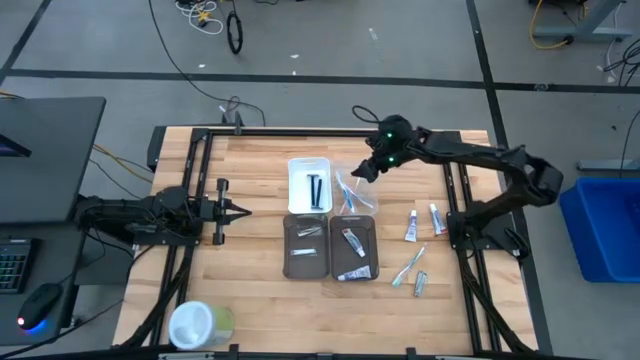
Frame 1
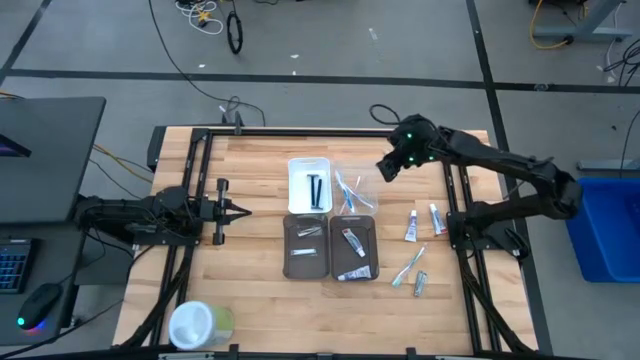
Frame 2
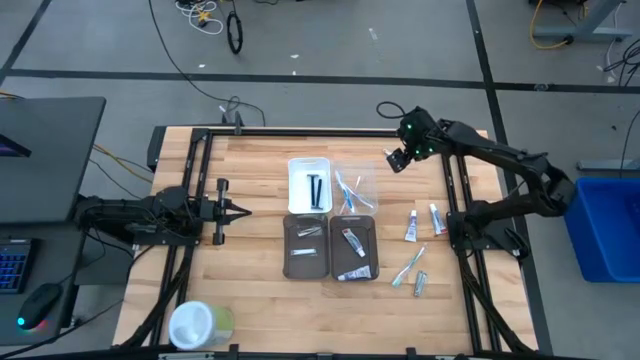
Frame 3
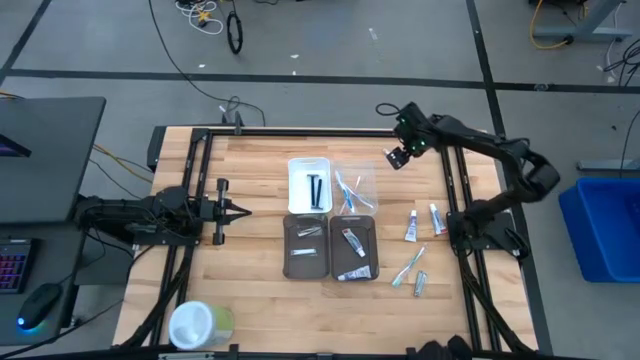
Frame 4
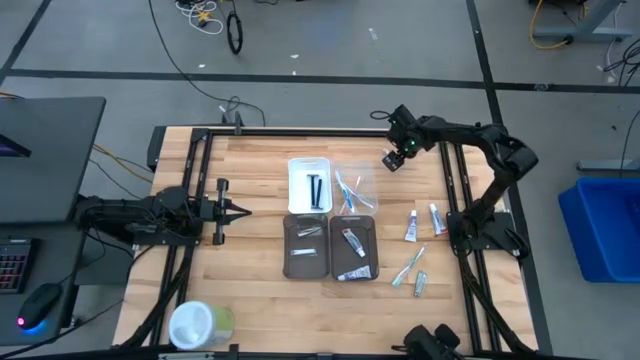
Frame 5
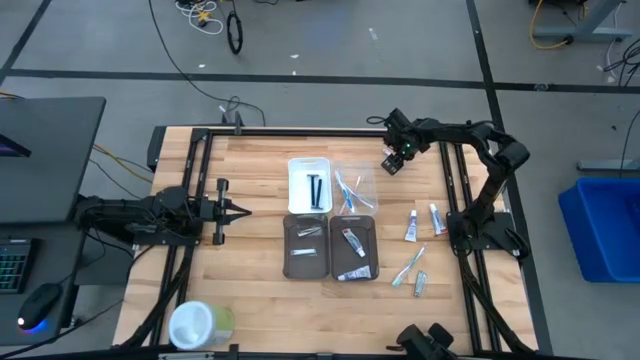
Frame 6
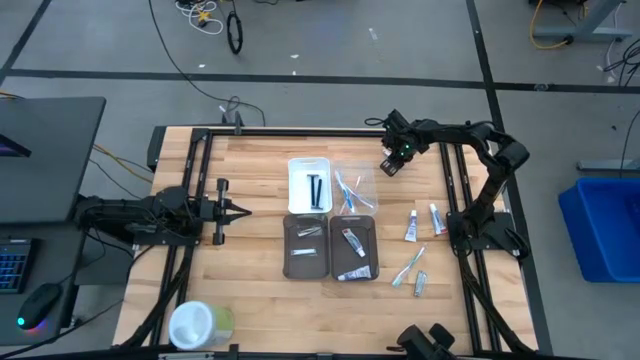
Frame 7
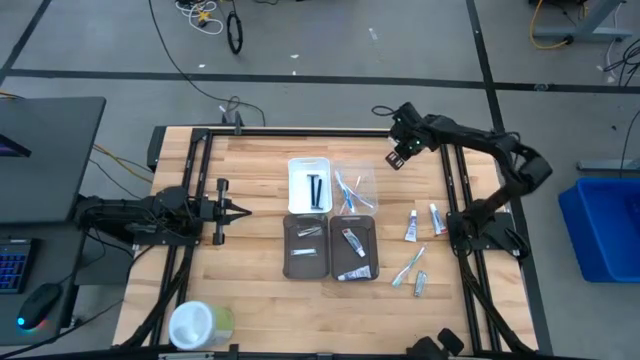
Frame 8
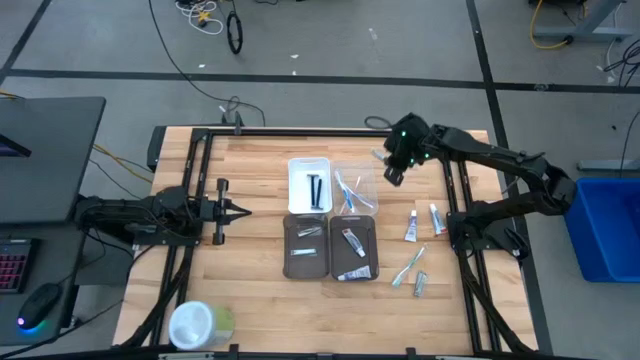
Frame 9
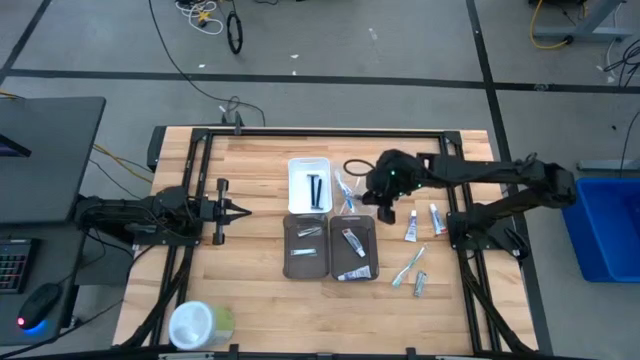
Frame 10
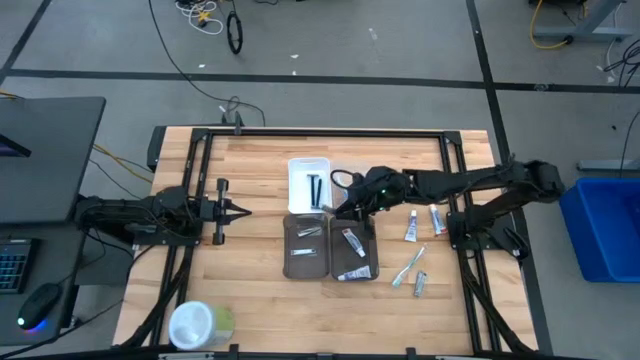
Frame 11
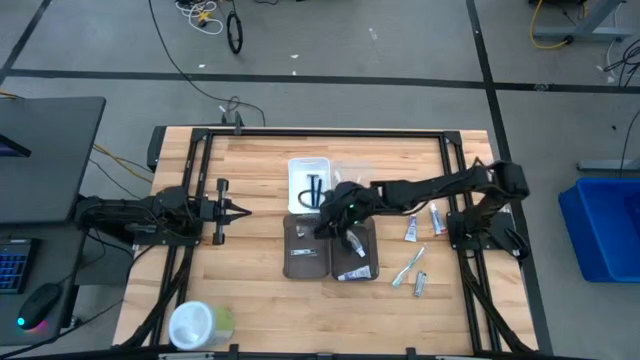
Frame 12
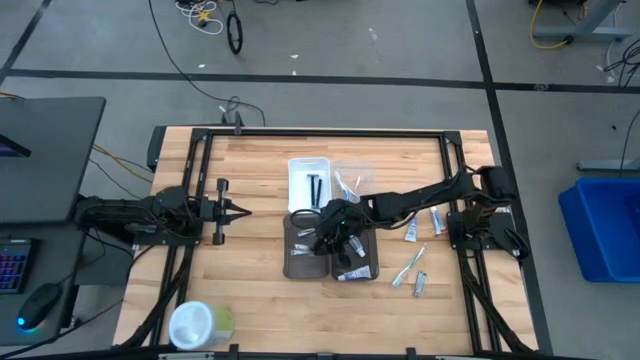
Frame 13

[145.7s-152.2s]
Task: Pick & Place Travel size toiletries
Put the silver nail cutter into the left black bin

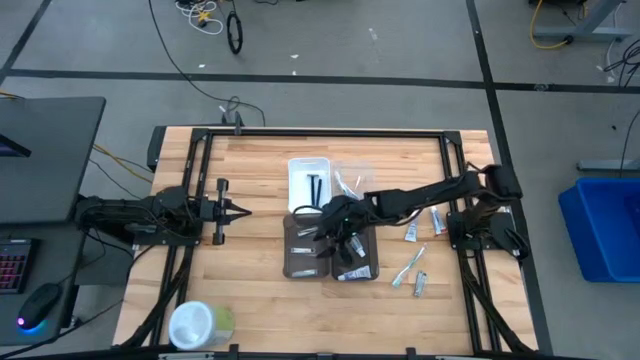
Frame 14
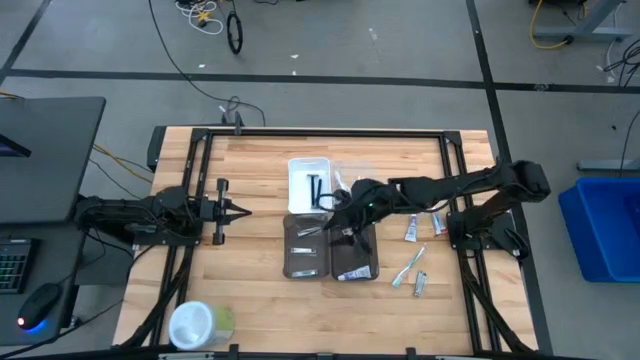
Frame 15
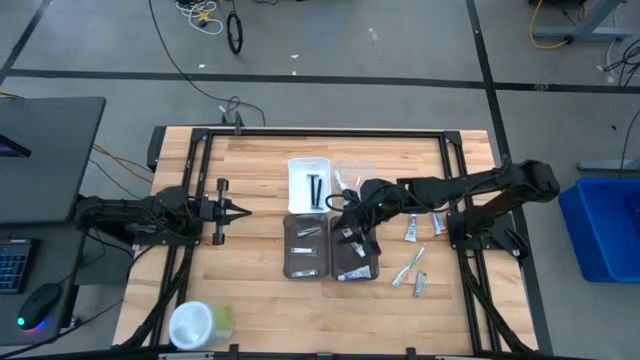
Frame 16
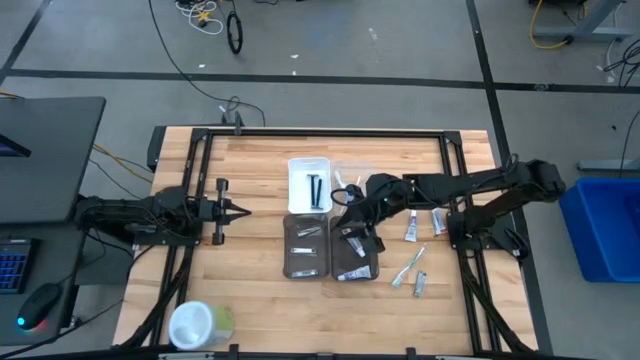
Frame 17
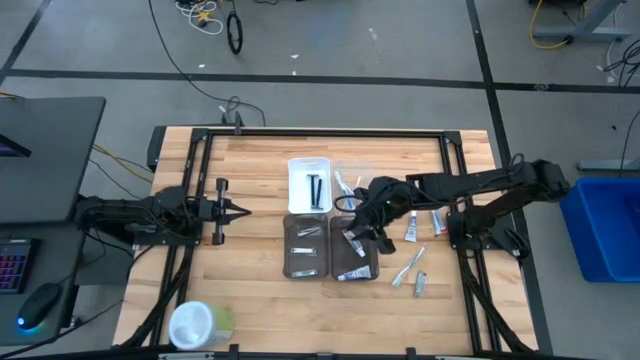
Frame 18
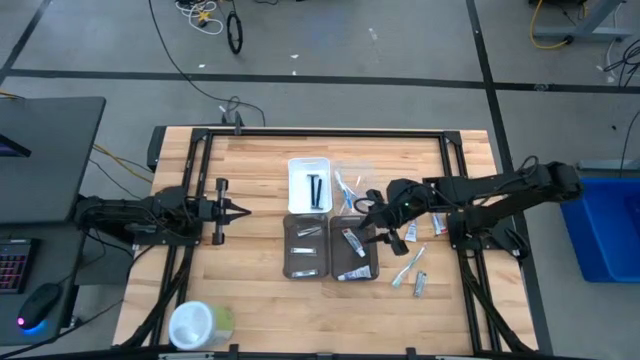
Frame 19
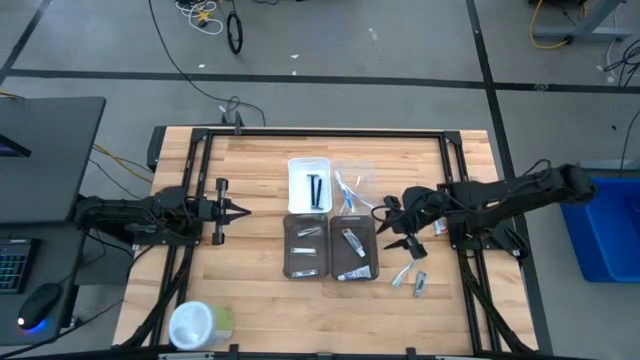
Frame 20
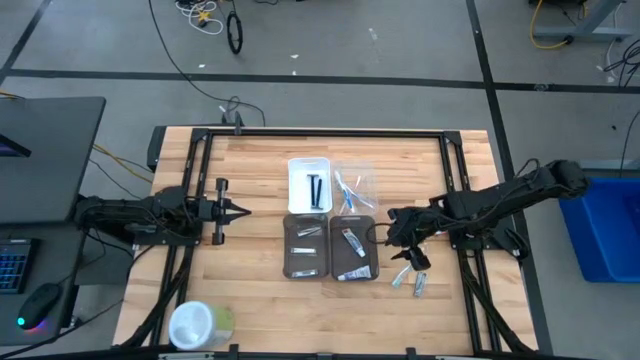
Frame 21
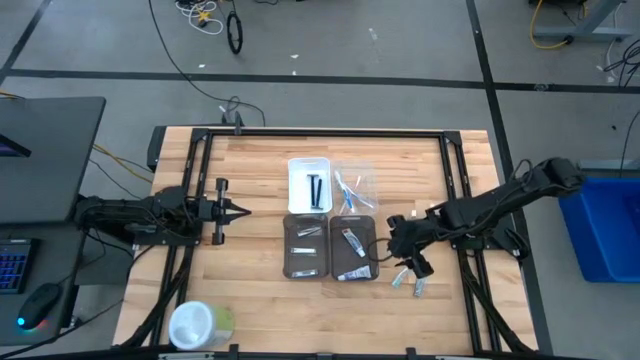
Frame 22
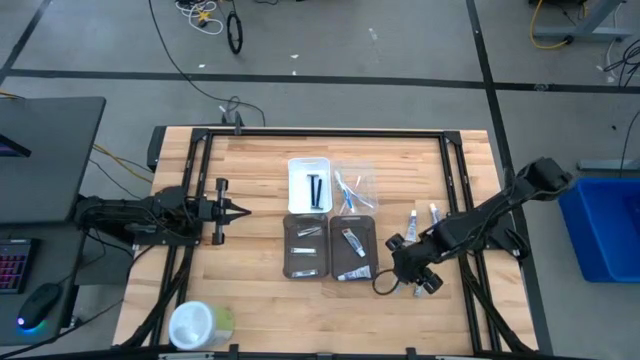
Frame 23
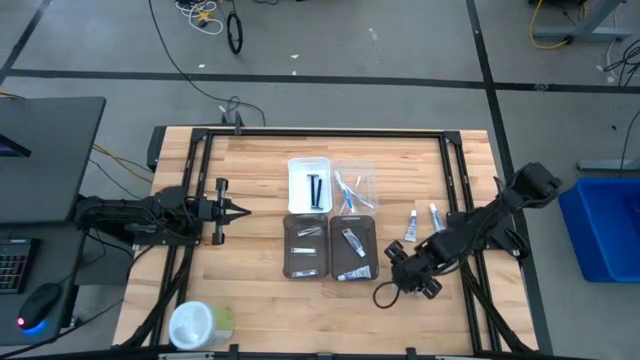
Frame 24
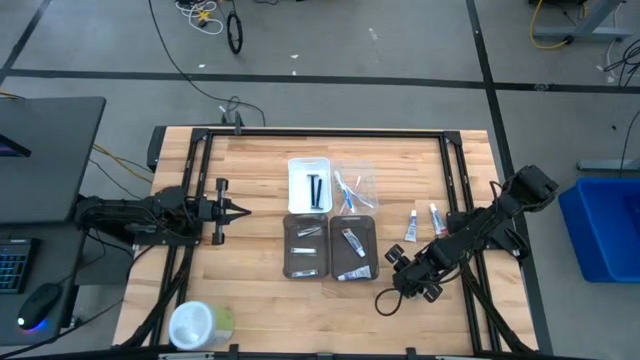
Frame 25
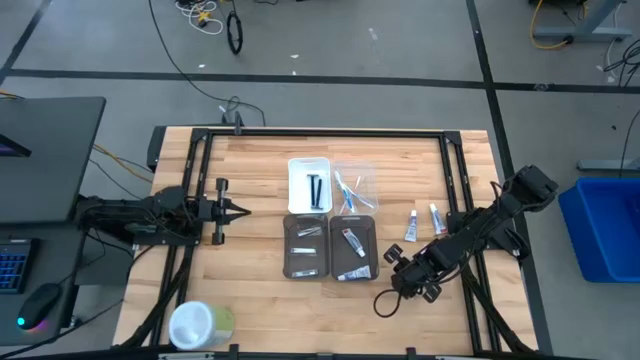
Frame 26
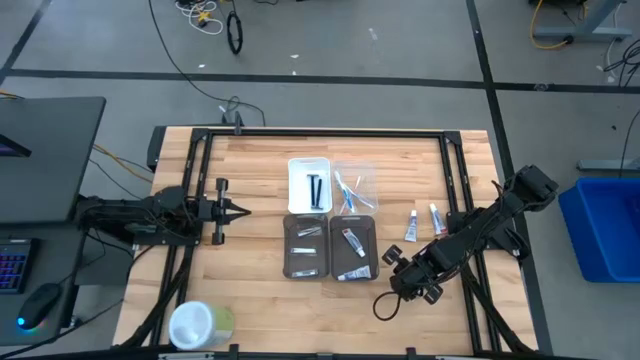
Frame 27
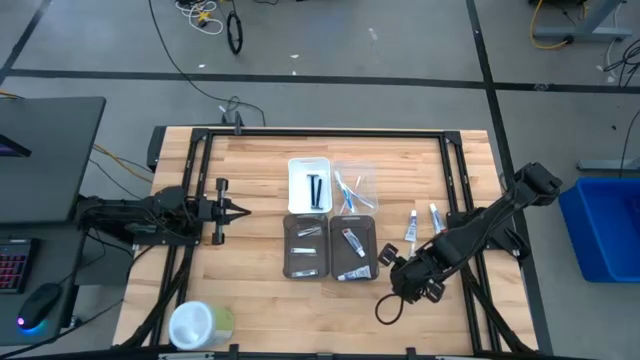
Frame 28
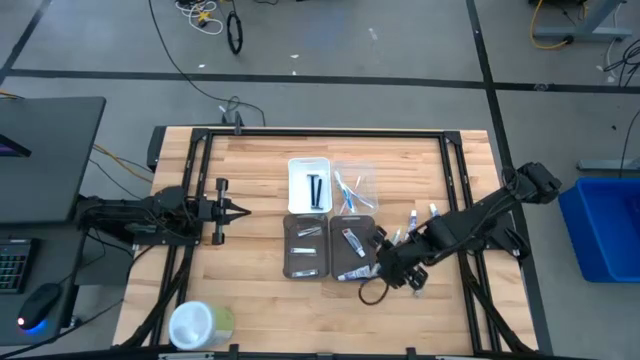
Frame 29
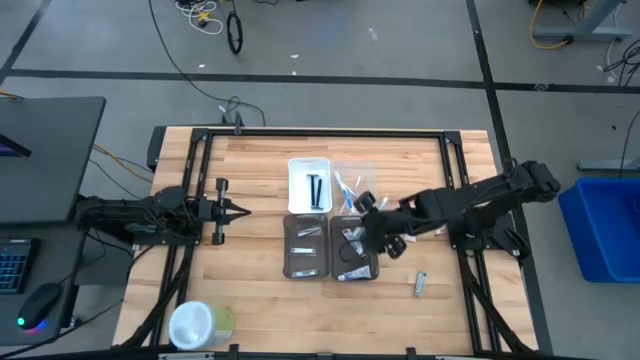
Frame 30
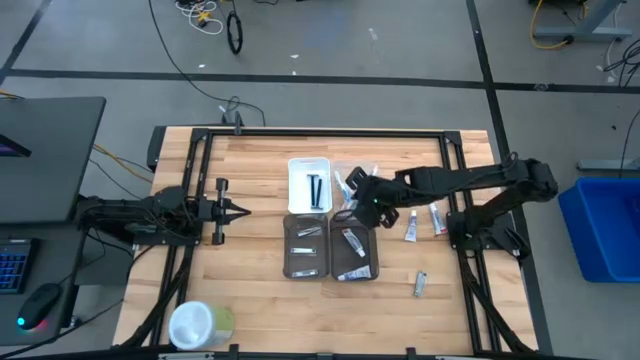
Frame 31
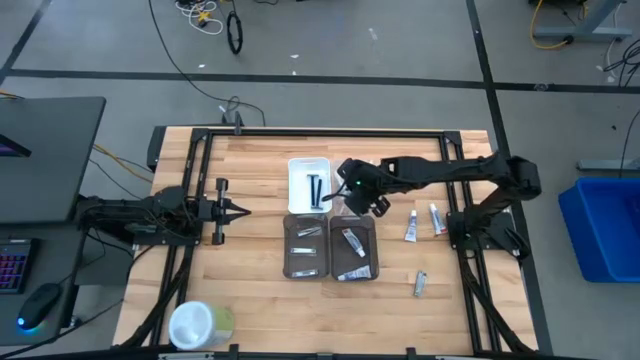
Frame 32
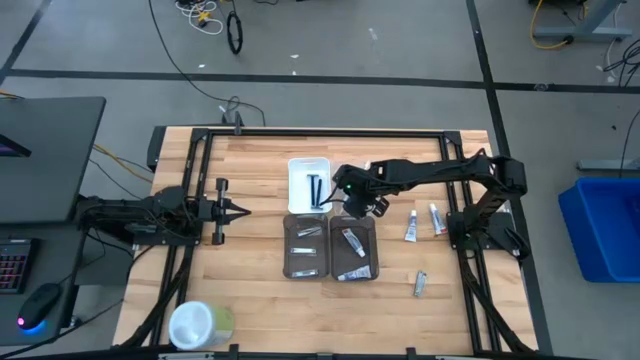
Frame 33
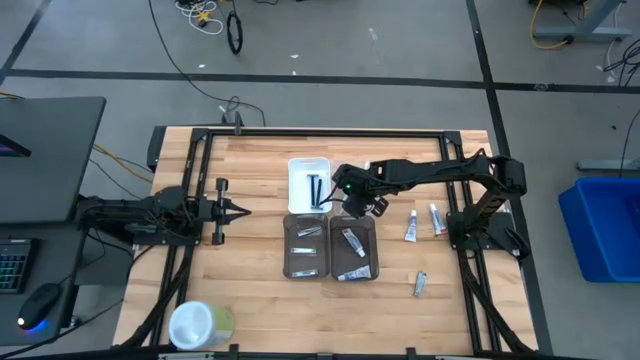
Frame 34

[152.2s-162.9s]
Put the blue toothbrush into the transparent bin

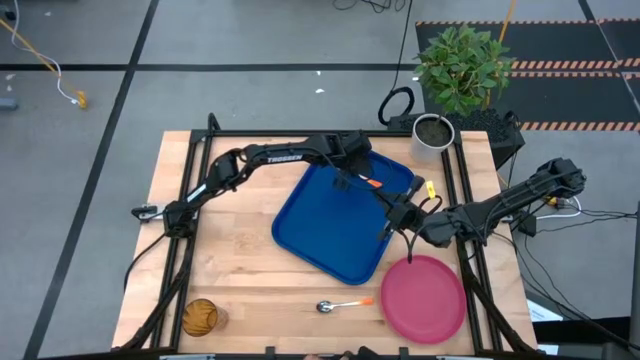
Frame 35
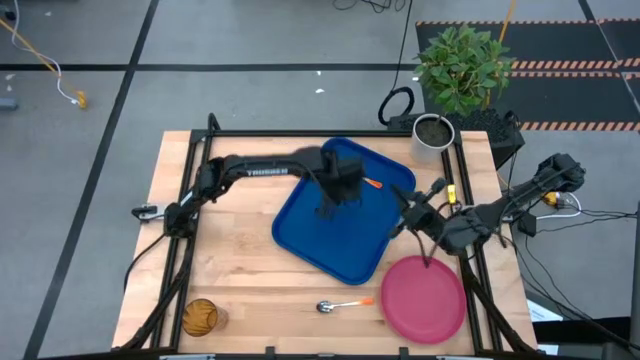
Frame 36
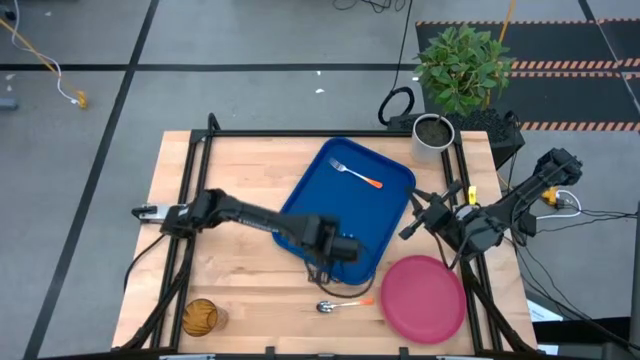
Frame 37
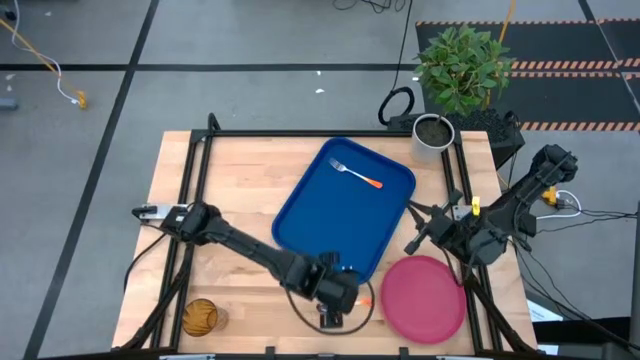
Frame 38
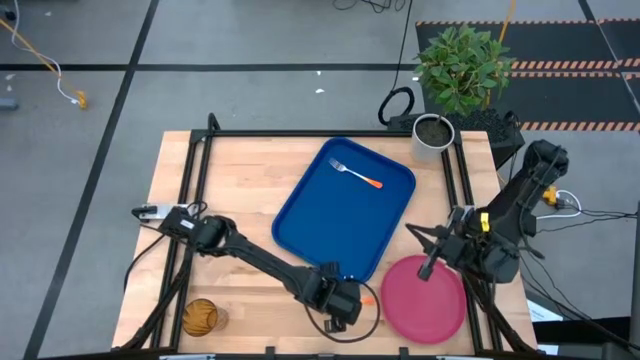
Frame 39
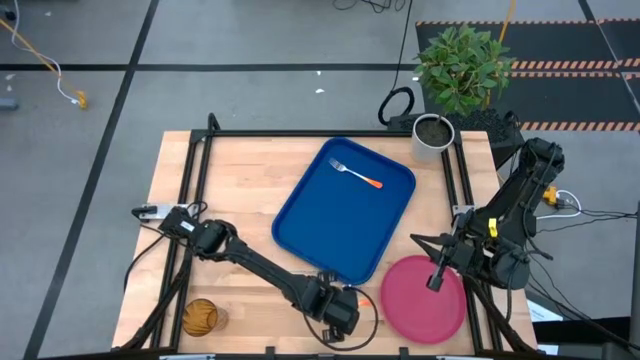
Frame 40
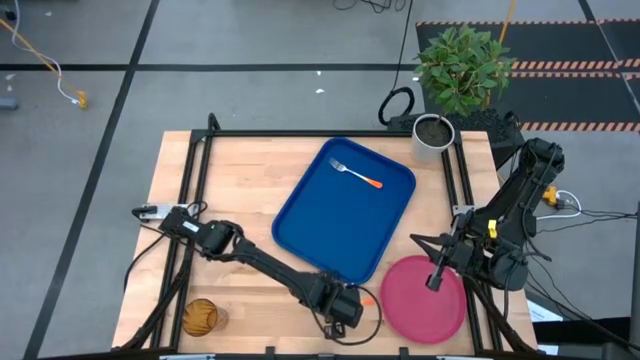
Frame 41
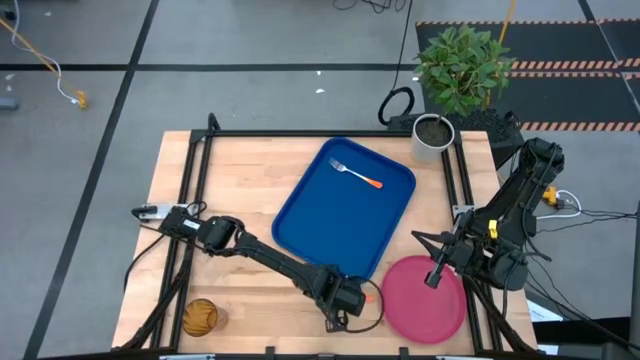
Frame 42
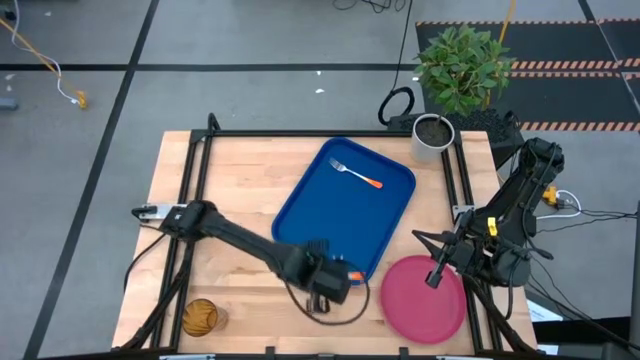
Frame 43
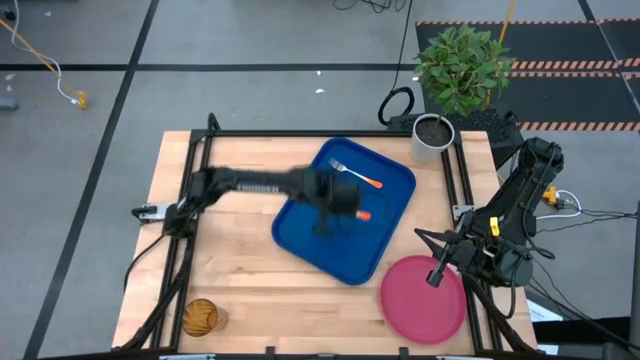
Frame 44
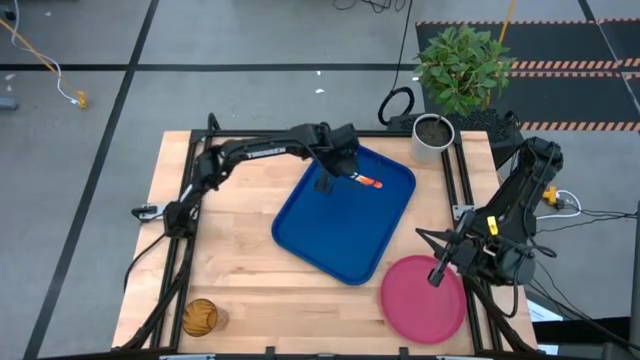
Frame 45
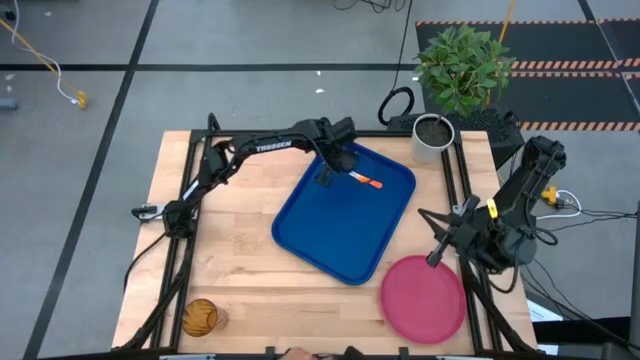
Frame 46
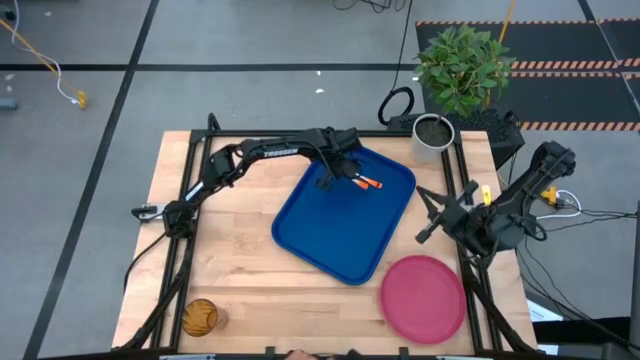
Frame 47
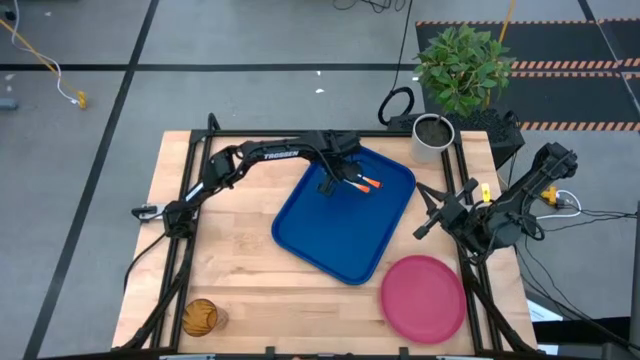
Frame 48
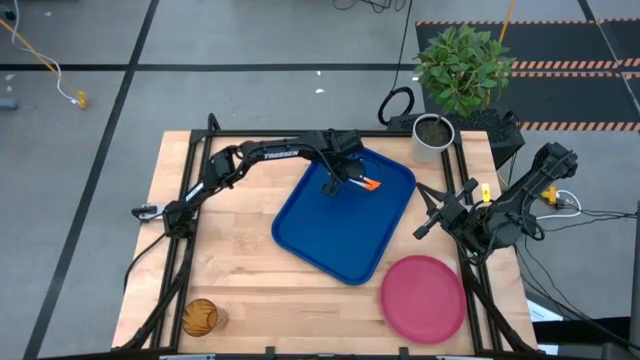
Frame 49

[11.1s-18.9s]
Task: Pick and place plate/cup/fork/spoon on tray
Put the spoon on the blue tray at the bottom side of the fork
